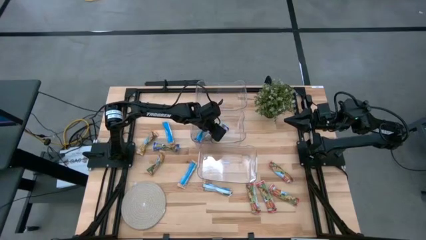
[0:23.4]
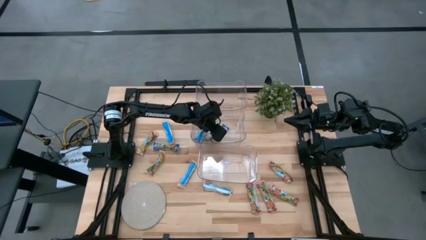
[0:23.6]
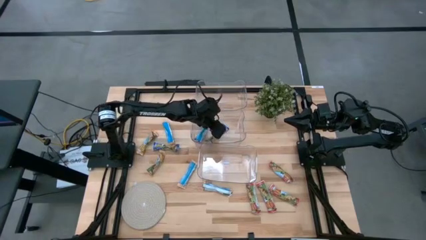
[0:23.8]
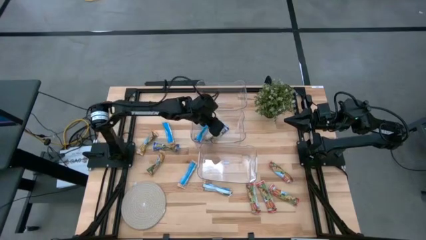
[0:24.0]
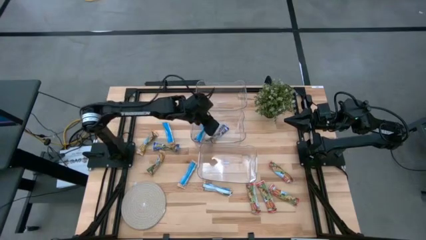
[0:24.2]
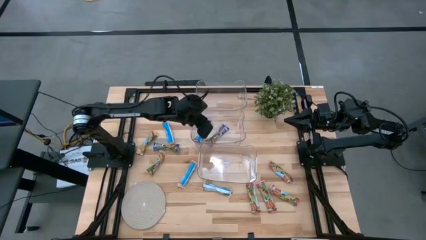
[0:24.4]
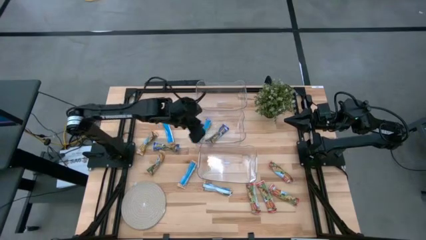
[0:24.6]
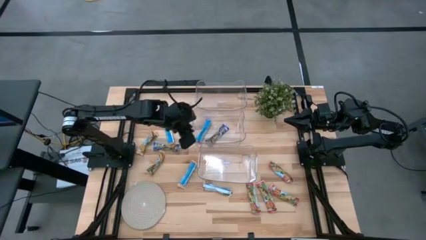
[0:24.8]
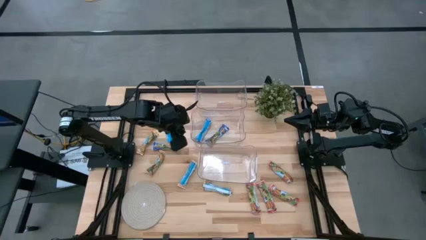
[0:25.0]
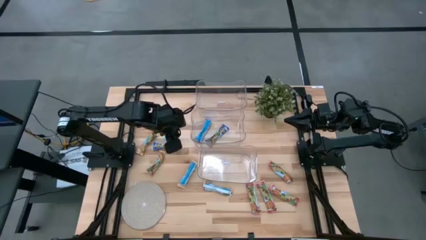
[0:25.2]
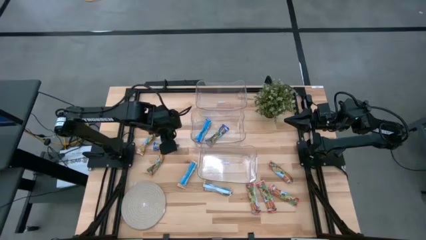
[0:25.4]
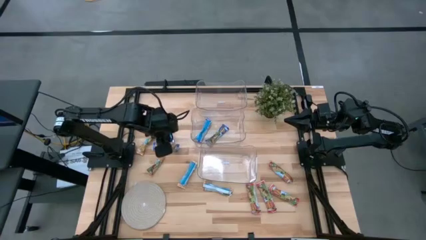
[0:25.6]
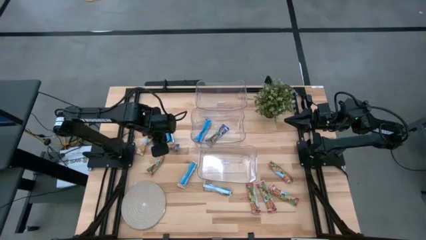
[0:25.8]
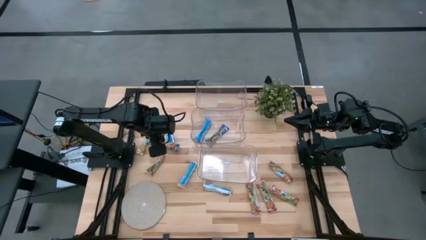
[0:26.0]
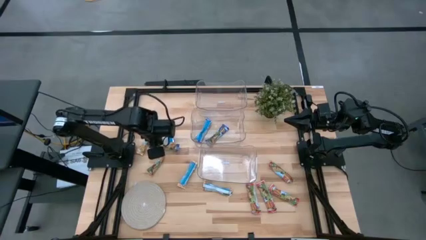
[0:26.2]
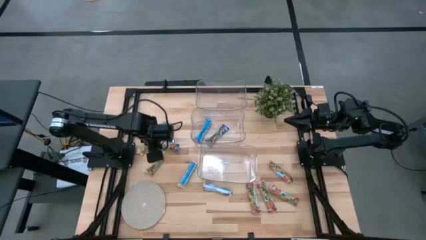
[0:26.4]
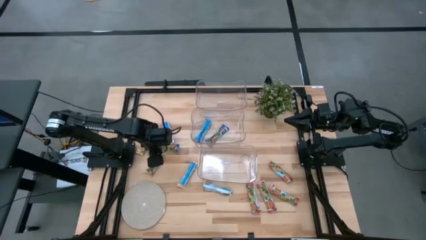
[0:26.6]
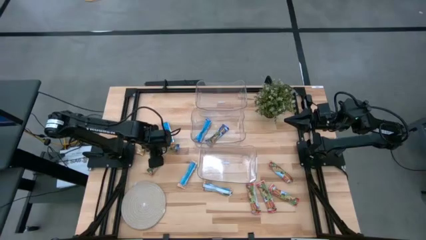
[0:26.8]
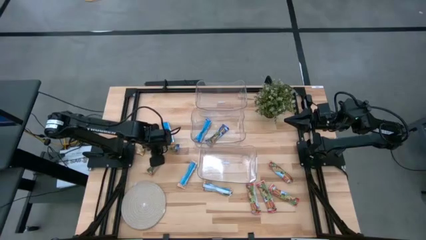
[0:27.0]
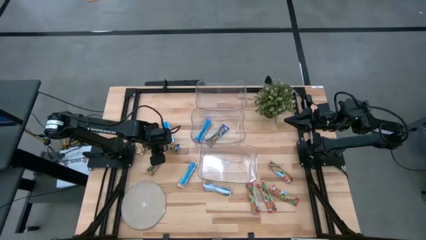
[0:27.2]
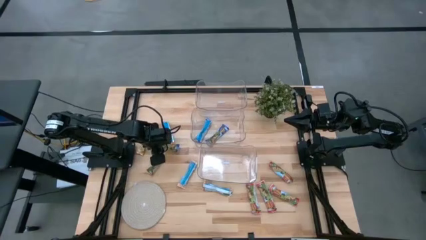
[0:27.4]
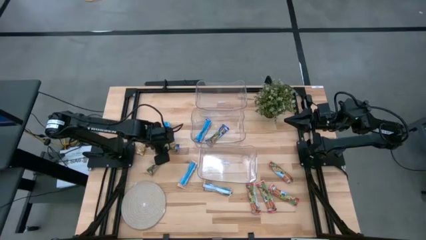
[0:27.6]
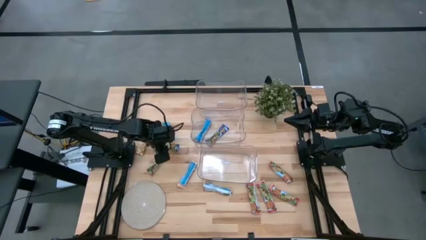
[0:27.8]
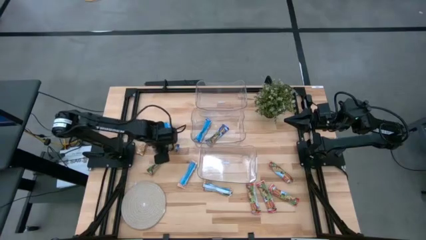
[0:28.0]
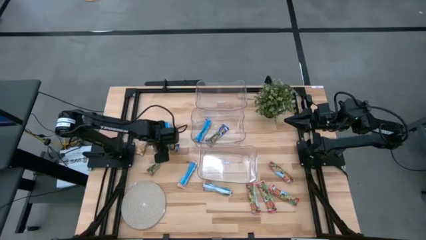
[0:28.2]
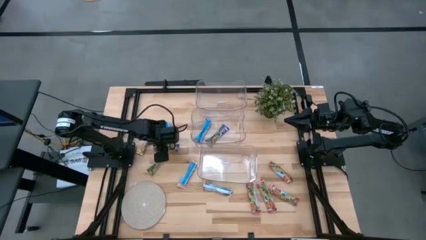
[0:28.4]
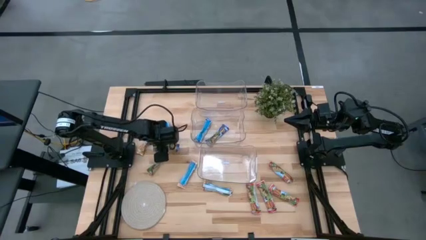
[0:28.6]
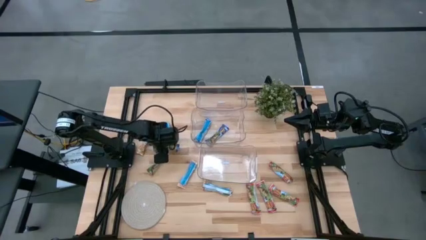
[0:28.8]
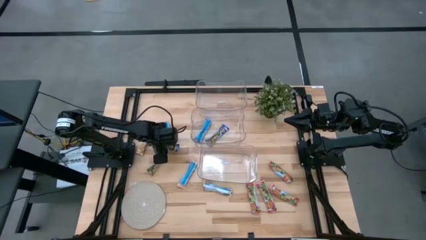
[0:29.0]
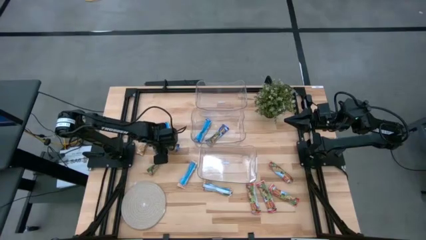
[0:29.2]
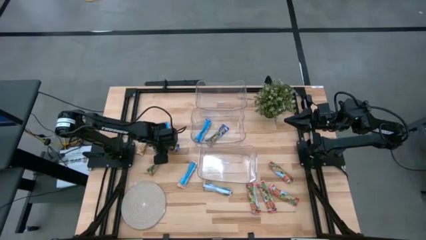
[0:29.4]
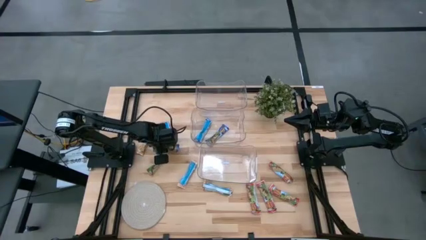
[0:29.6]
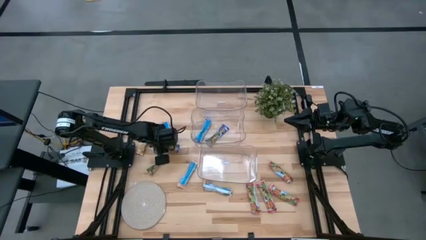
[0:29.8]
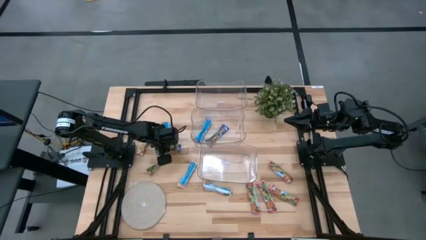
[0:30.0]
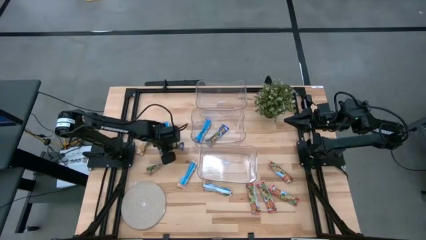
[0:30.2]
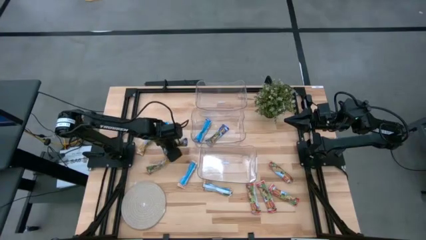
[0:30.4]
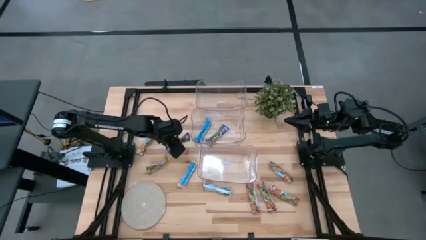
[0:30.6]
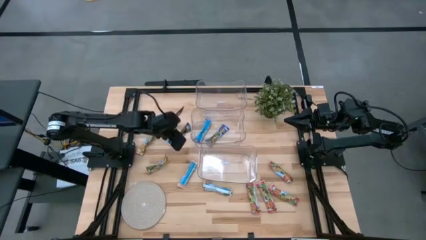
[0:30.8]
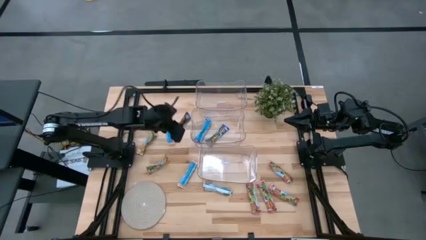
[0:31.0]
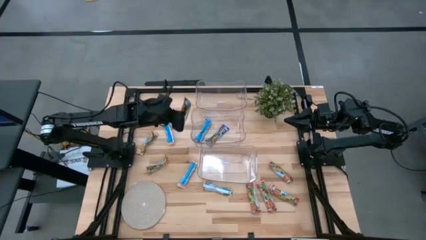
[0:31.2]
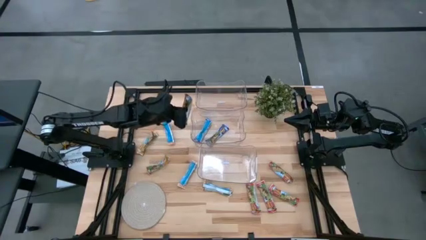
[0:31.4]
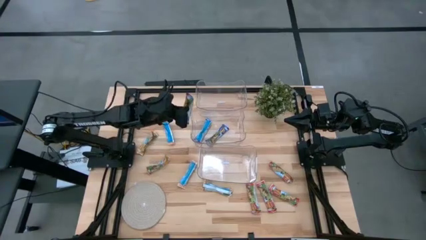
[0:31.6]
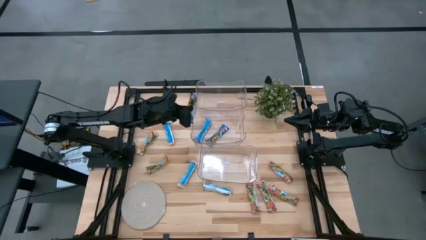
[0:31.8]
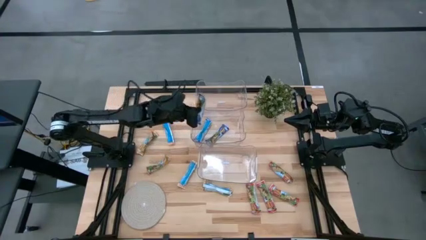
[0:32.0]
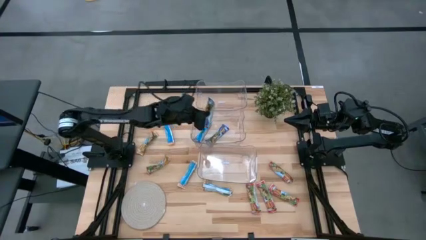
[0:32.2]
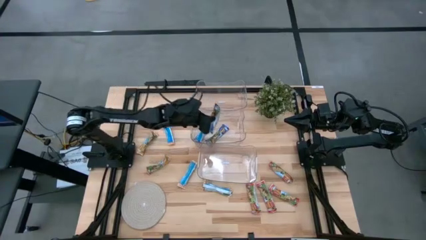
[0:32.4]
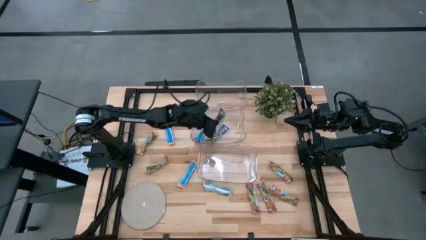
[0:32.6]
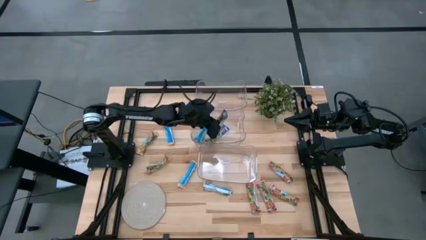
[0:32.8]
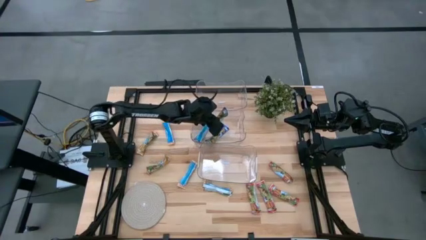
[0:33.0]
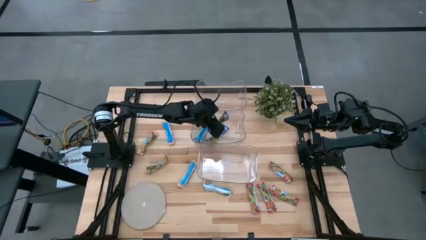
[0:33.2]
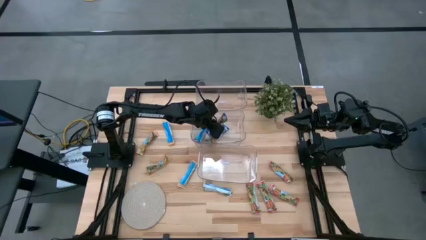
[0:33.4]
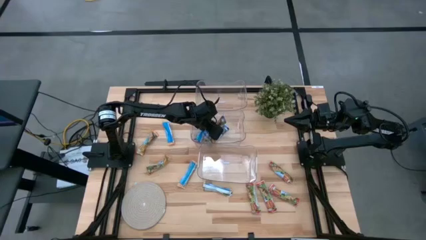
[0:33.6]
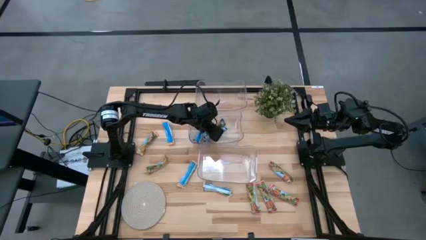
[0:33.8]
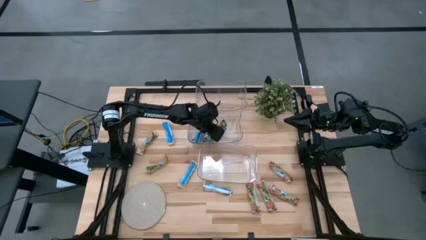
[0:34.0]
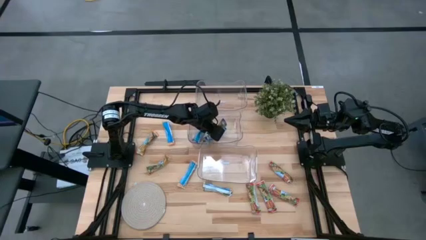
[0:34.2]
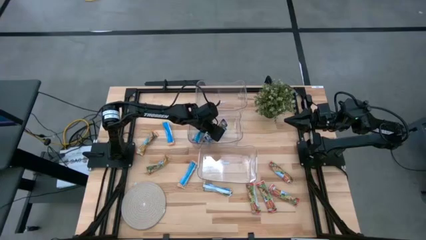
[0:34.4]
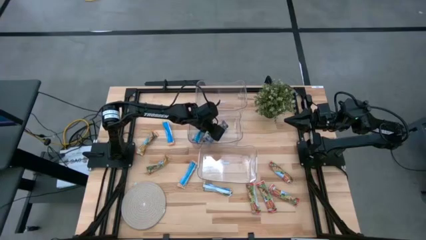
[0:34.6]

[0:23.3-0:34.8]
Task: Pick and place Granola Bars by type
Put the blue granola bar into the middle transparent bin

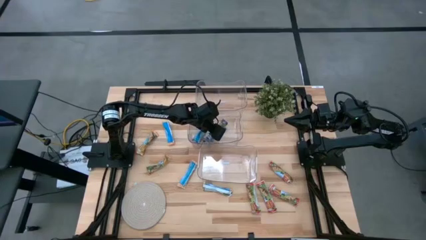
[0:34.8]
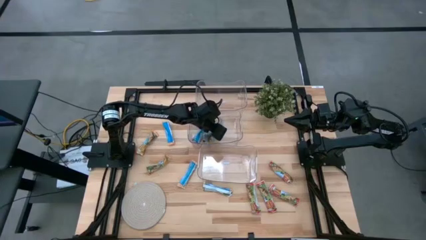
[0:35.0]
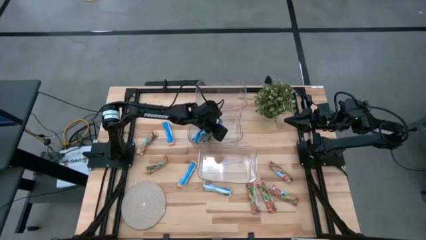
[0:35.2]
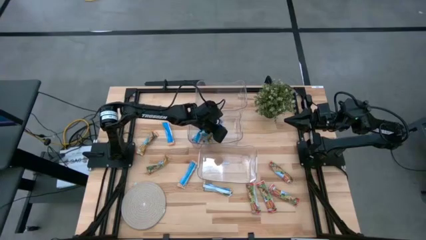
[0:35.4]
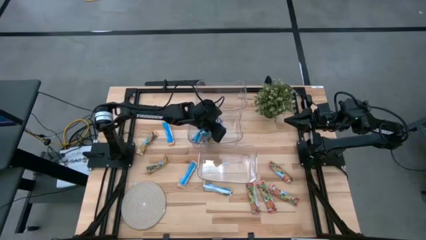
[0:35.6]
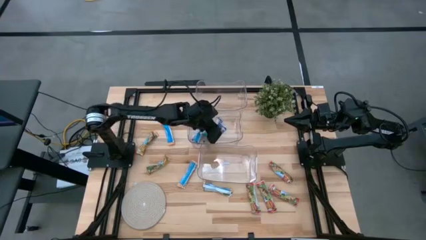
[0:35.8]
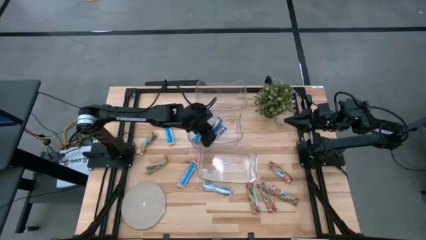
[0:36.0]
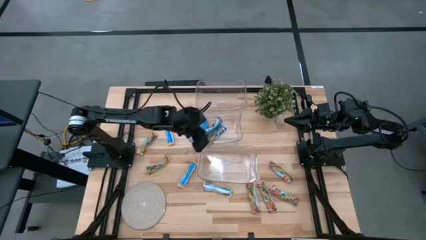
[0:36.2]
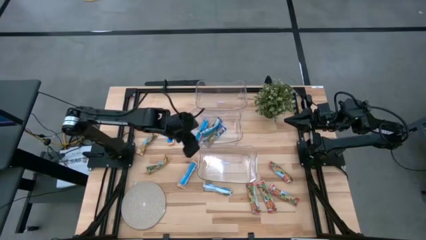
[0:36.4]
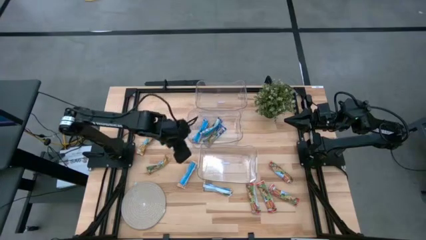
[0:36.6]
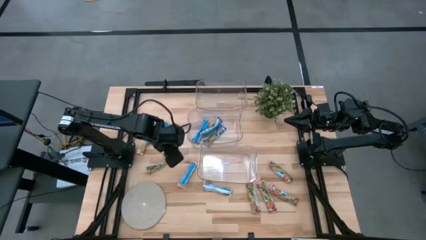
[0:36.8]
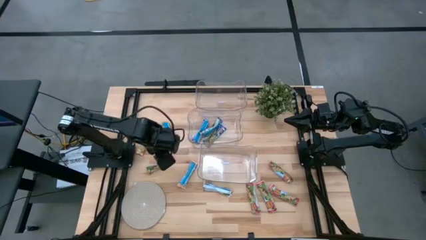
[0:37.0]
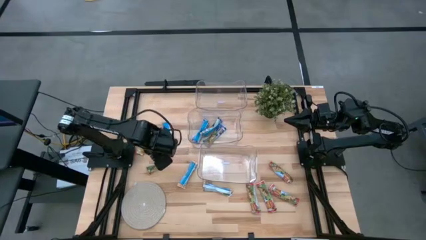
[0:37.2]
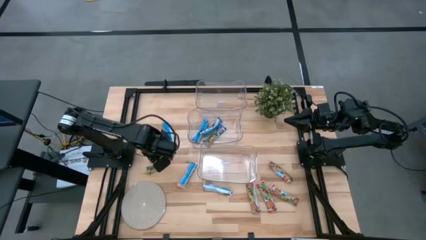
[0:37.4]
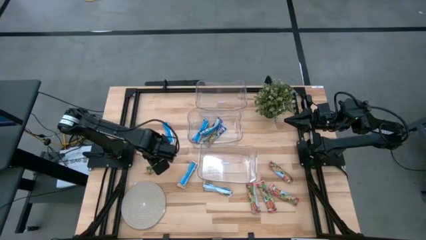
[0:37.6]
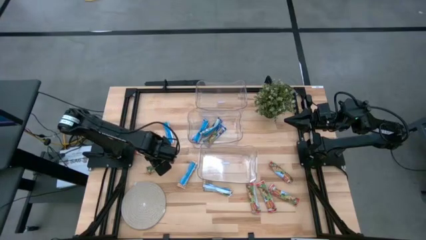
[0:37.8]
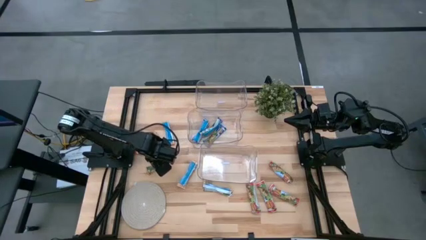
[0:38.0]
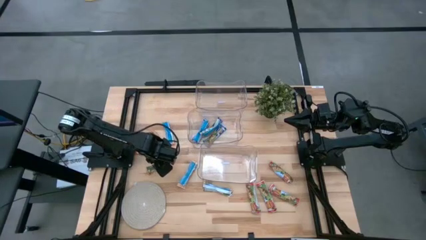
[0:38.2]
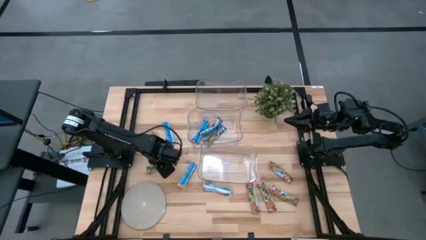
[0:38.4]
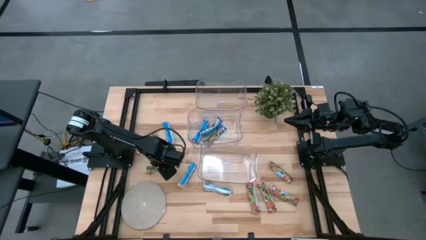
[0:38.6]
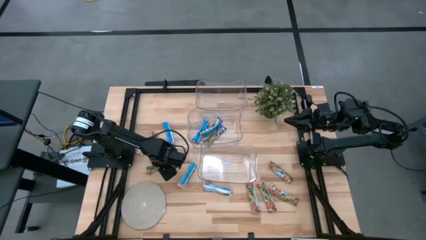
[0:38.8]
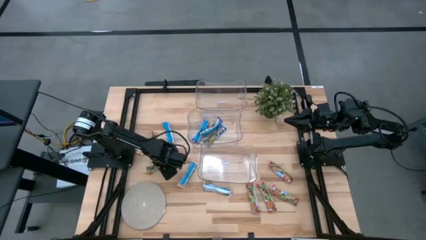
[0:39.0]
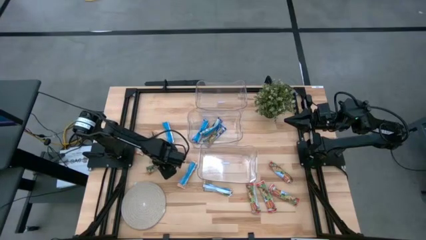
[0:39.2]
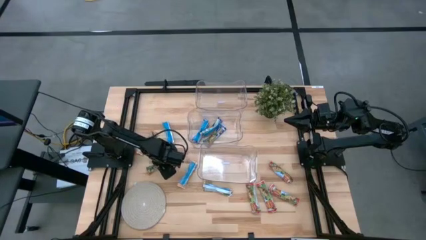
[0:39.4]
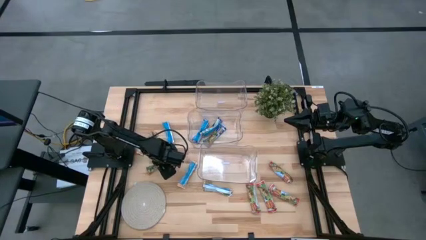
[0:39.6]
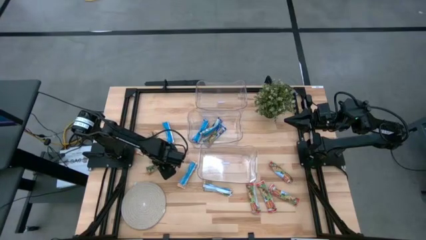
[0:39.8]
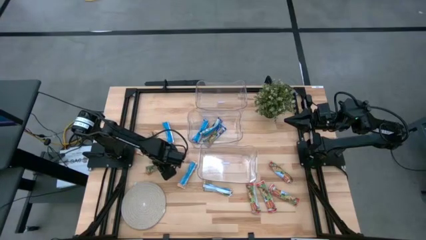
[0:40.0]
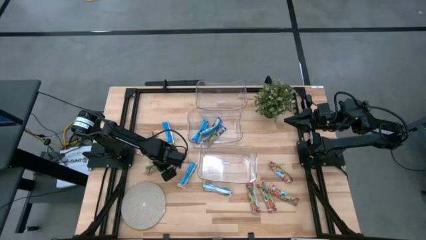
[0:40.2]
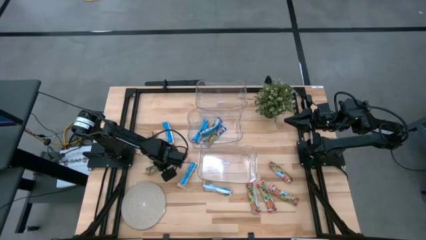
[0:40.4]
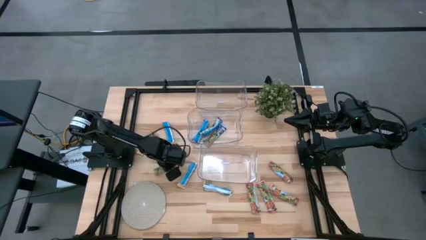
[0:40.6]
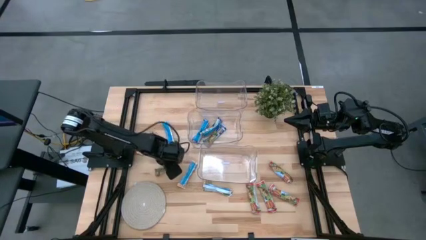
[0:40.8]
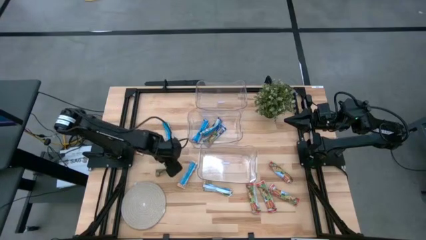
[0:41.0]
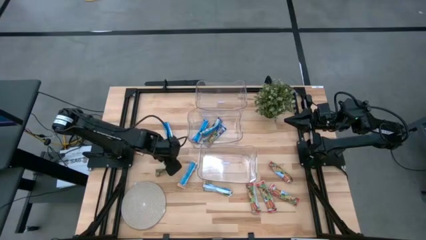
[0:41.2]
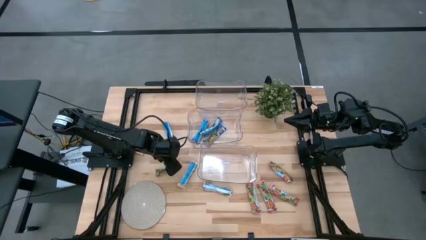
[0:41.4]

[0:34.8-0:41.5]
Put the yellow granola bar into the bottom transparent bin
